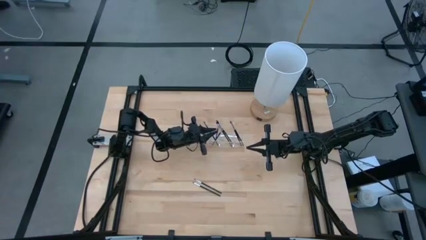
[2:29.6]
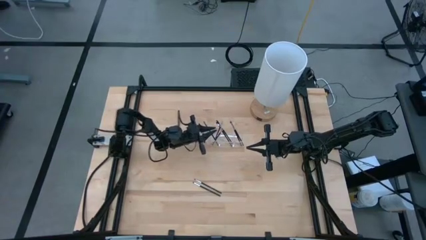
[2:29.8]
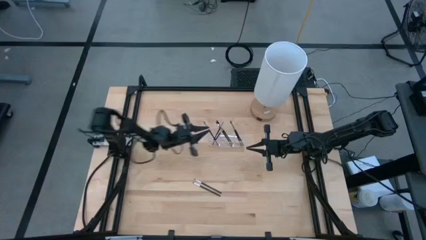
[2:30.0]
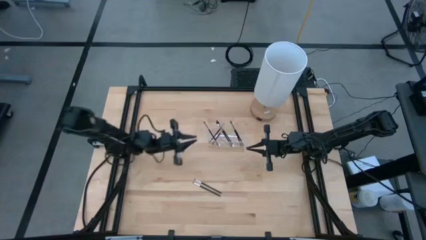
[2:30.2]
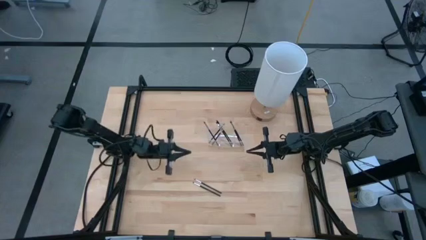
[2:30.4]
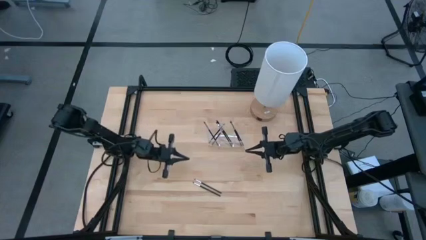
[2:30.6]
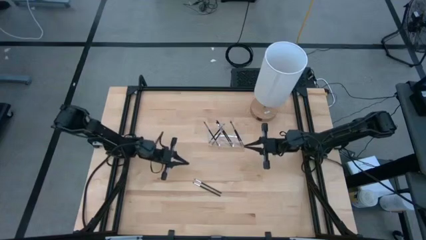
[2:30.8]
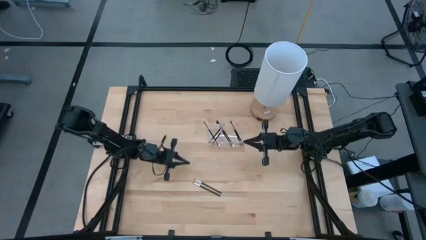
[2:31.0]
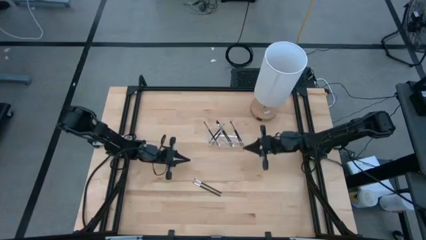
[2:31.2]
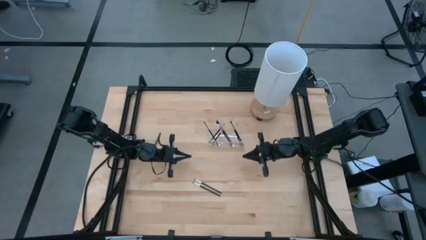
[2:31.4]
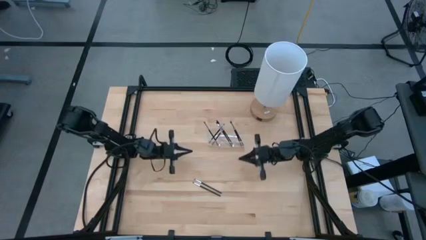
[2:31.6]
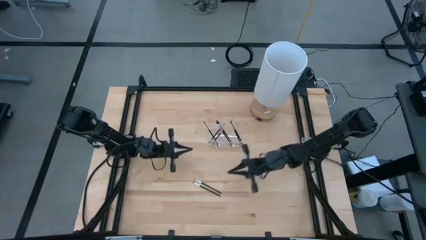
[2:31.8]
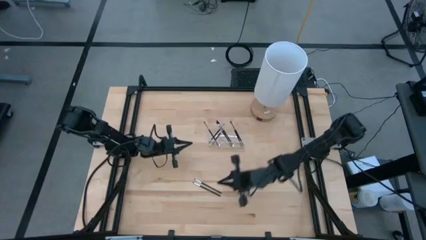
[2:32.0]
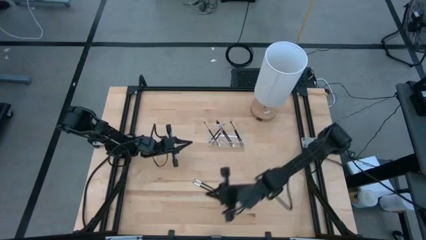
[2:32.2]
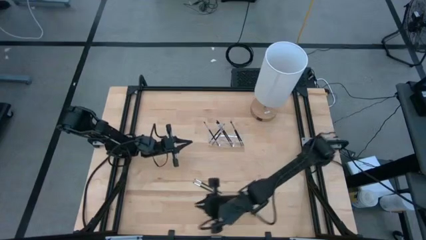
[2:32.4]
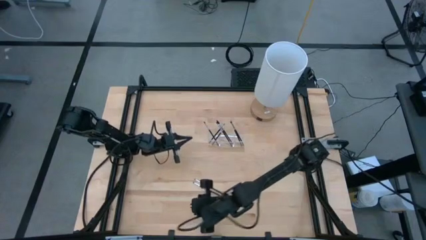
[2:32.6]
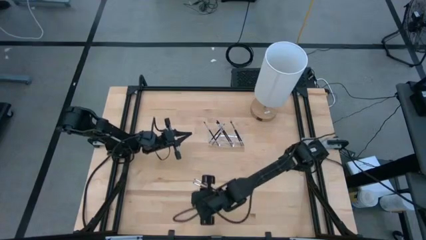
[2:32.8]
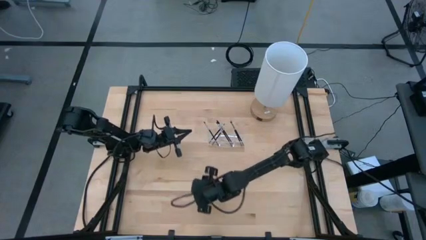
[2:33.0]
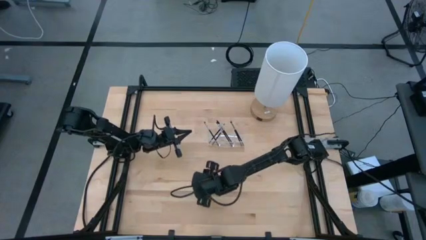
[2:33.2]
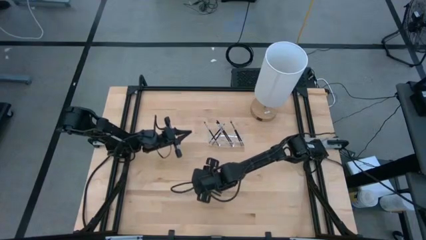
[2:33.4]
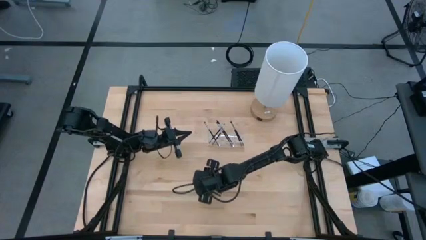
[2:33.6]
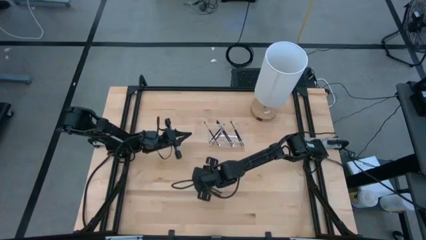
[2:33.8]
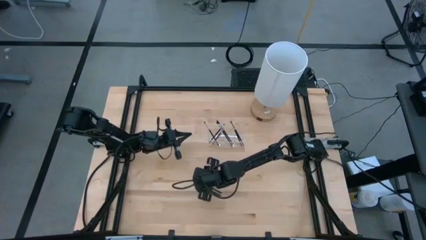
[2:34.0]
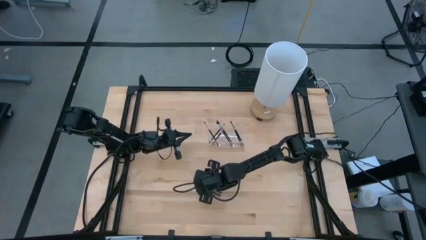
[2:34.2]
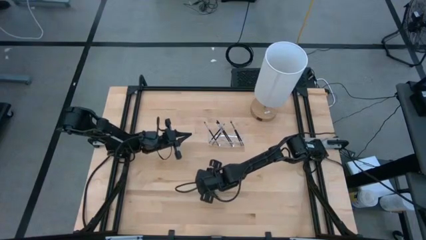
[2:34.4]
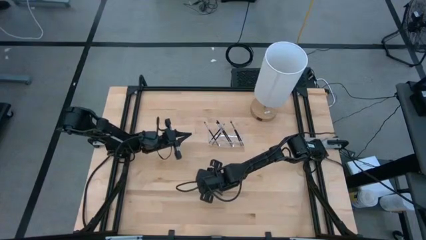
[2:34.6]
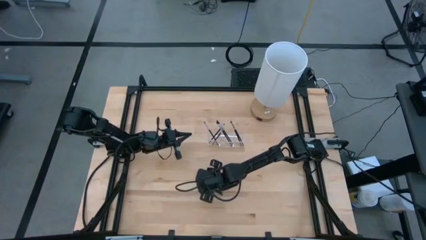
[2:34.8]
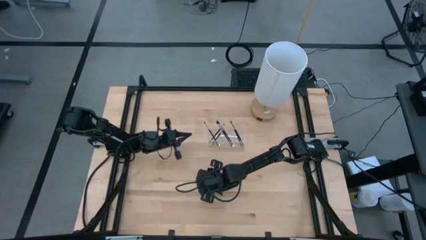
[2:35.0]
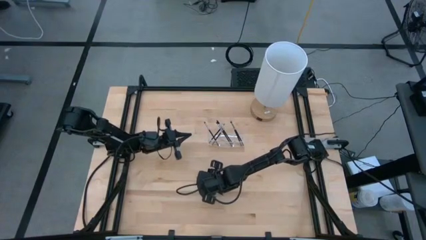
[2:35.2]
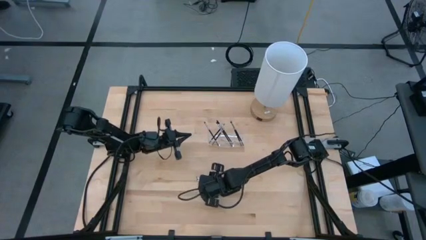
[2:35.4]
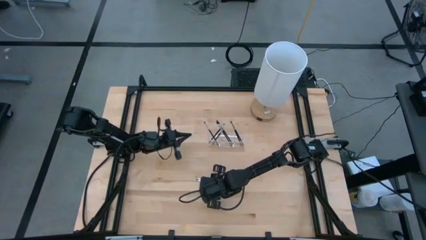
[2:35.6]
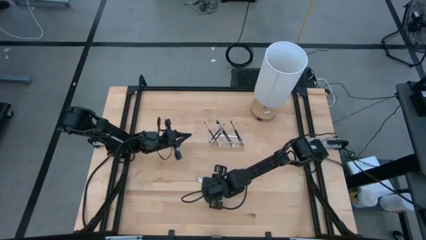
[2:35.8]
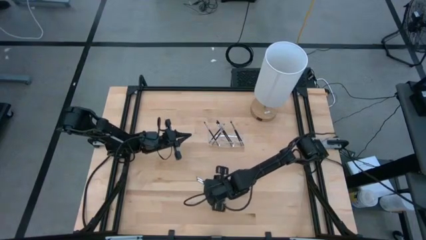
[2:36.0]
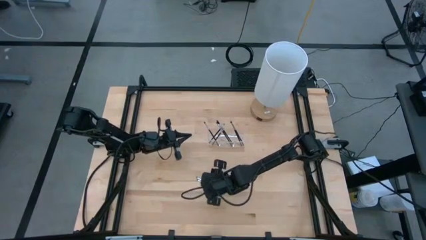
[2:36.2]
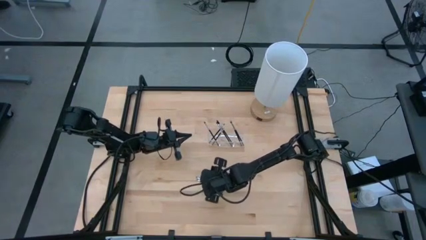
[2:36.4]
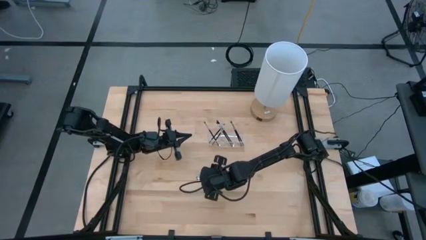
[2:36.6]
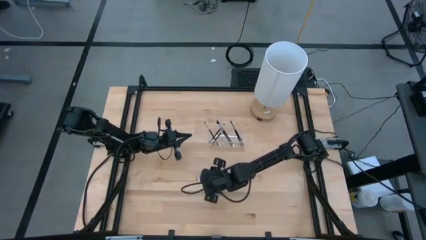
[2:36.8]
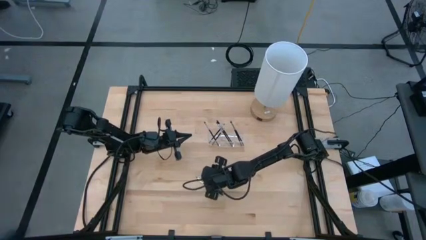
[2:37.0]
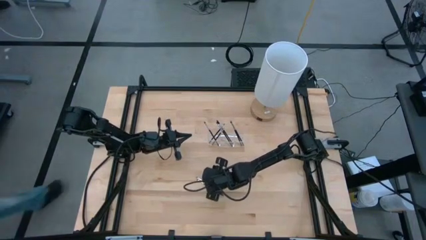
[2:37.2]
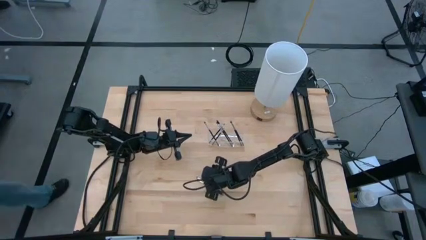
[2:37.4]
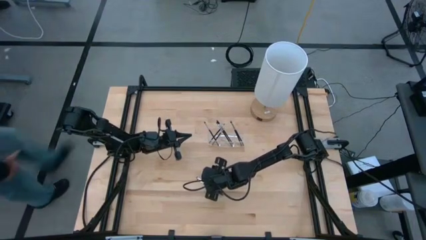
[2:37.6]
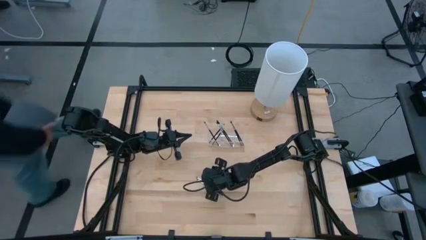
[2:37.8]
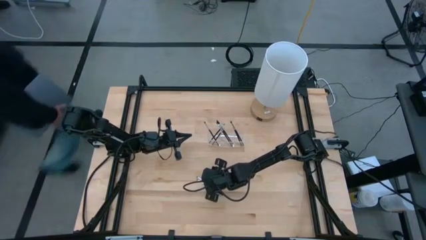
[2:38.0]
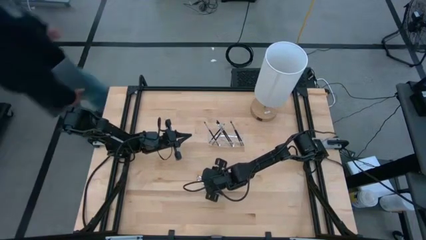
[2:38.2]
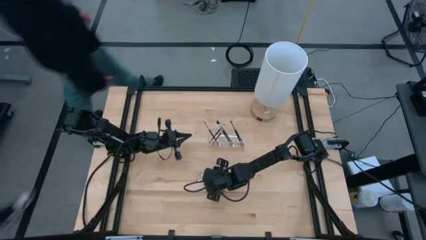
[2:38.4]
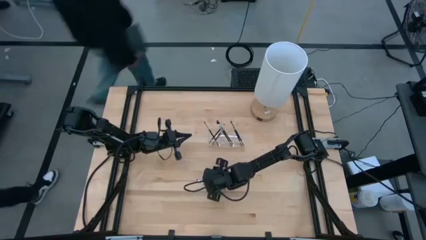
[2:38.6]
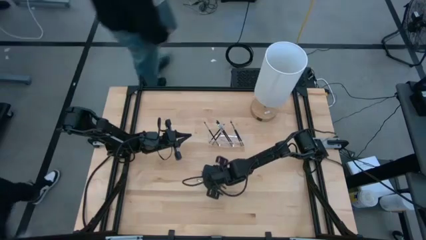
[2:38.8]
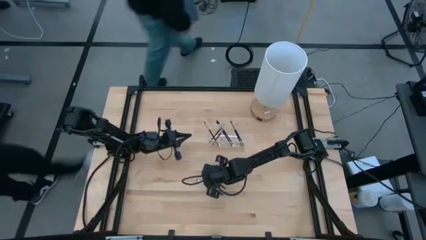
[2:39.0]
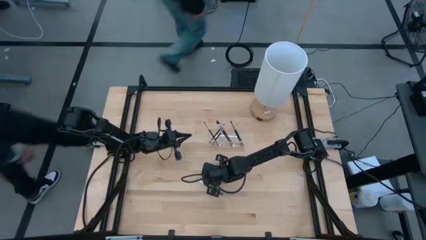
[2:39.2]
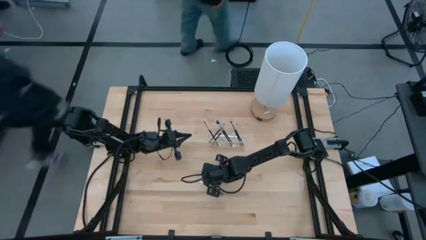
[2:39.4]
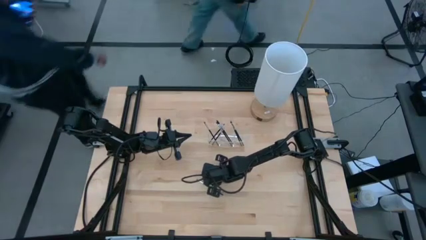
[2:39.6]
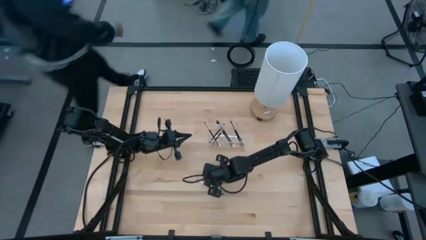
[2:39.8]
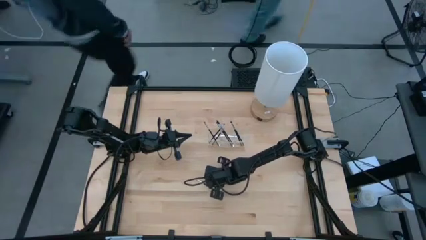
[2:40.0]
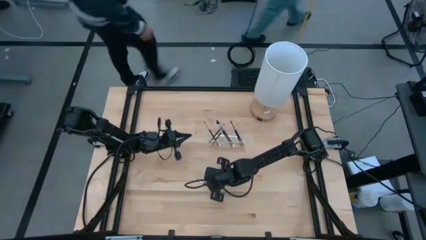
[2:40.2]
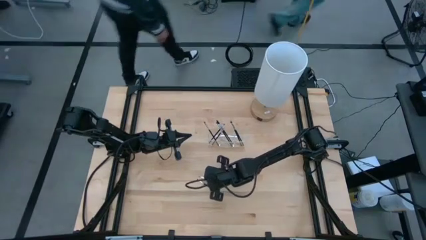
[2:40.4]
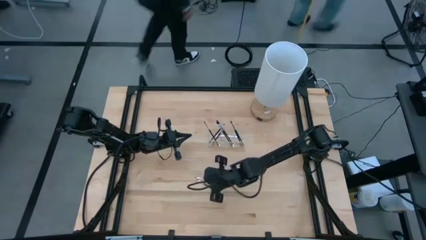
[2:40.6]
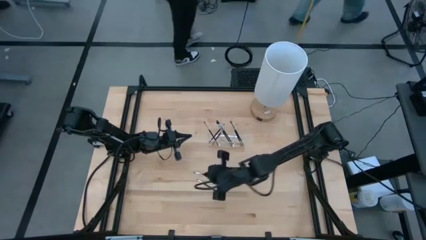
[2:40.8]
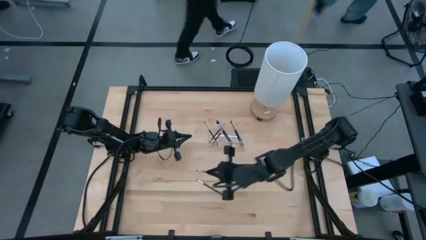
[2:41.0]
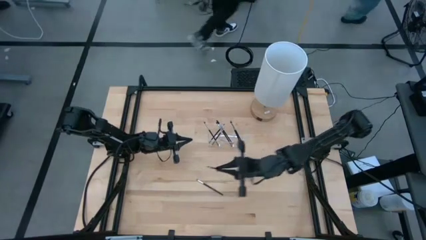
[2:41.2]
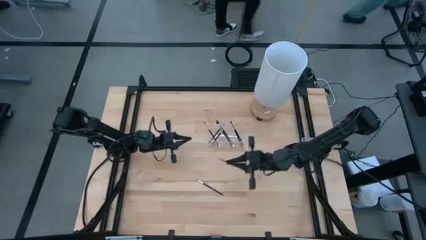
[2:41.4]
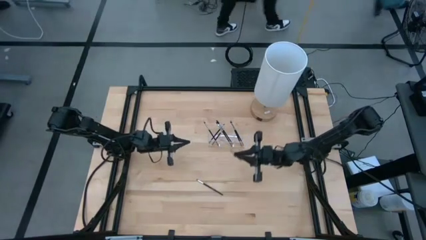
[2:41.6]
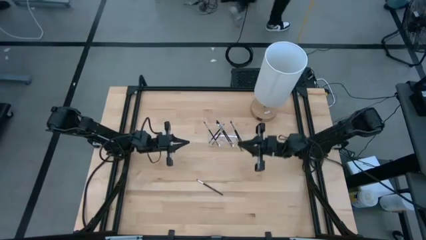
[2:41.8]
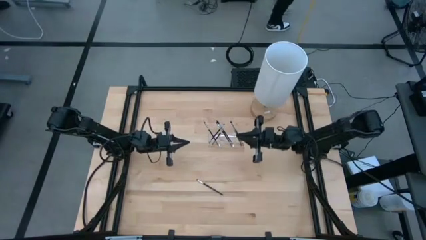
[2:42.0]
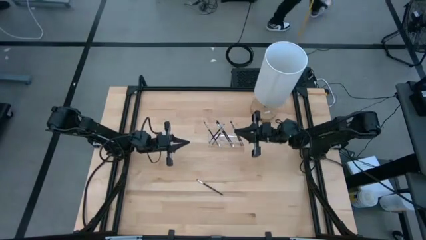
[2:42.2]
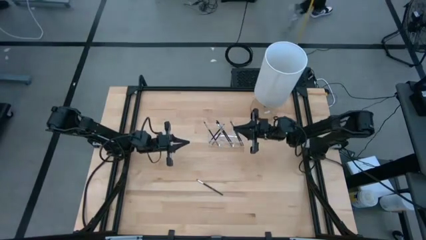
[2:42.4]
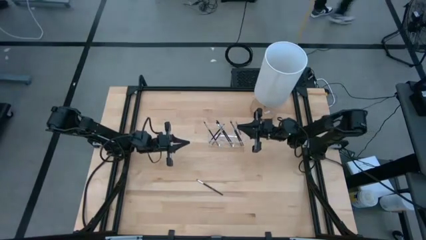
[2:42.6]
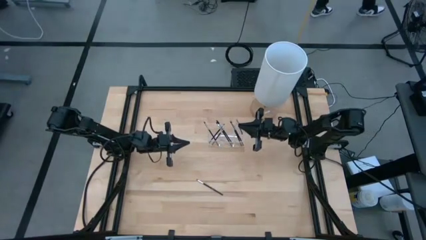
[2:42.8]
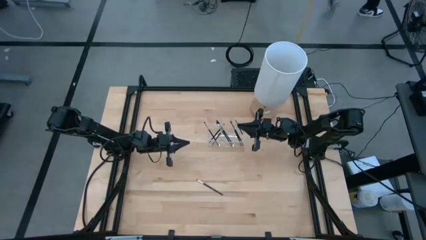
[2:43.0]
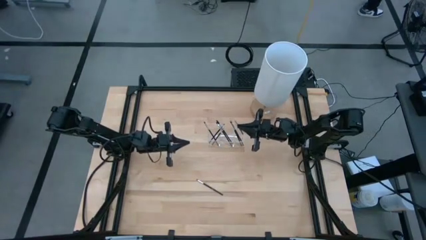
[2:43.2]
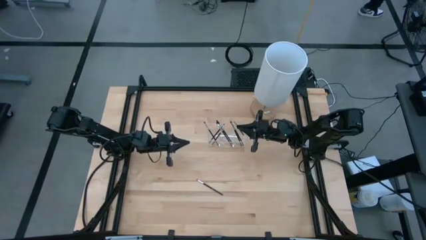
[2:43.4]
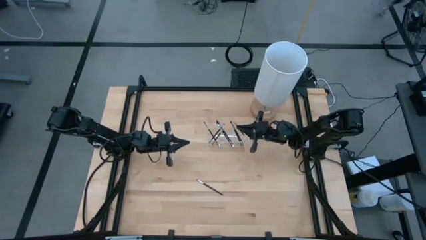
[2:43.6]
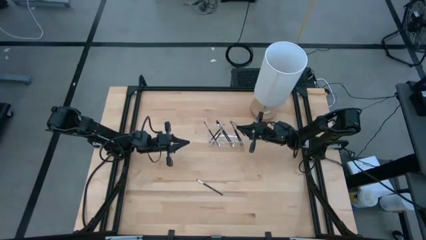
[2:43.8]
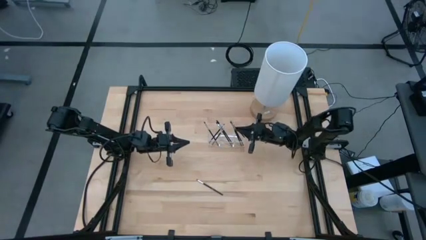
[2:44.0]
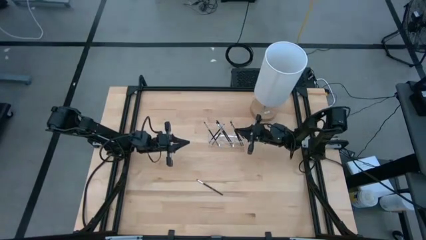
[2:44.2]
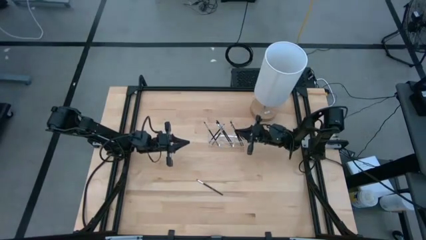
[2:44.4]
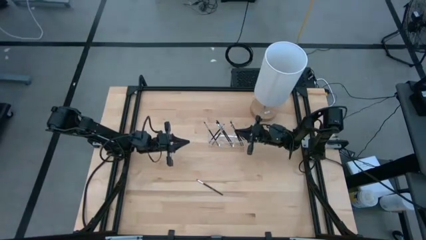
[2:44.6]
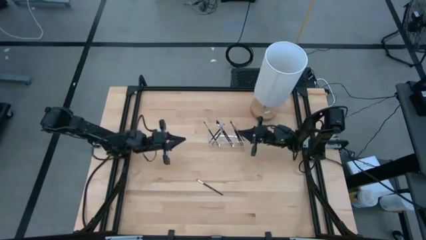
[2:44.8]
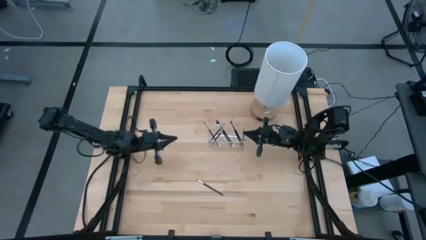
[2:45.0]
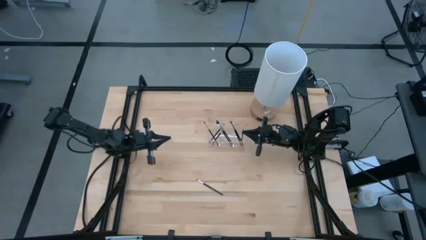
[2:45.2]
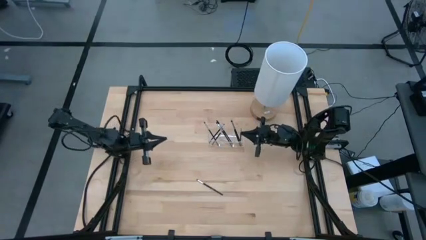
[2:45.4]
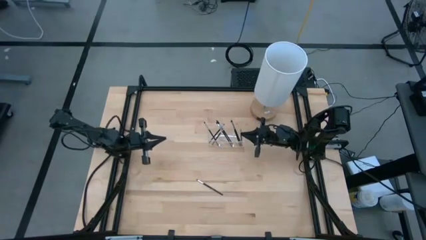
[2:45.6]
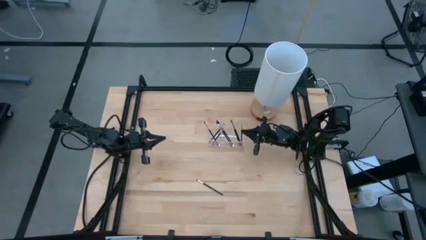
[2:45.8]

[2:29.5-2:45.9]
Task: Put items in baskets/containers
Put the black eyeshadow brush into the right section of the transparent organizer
